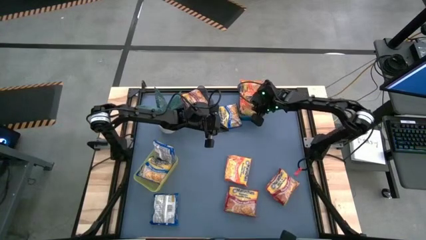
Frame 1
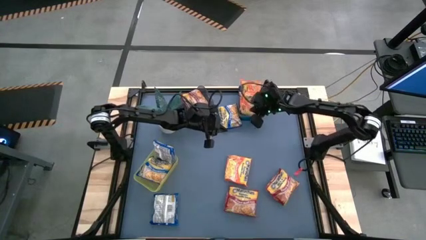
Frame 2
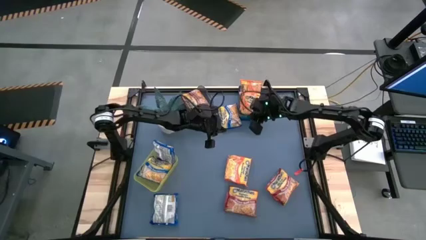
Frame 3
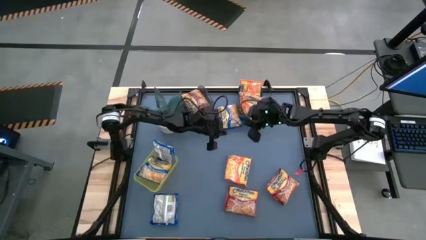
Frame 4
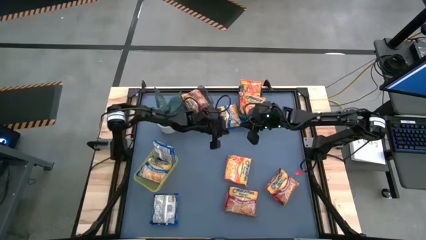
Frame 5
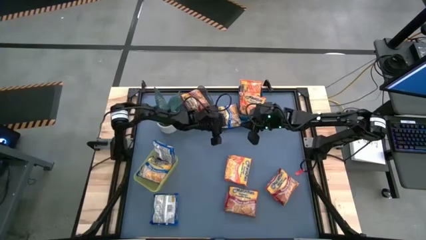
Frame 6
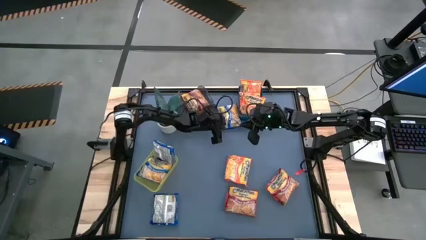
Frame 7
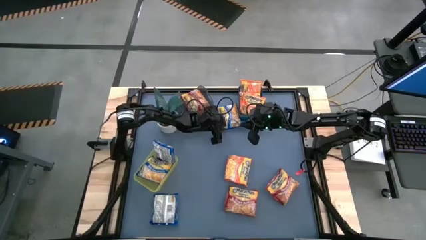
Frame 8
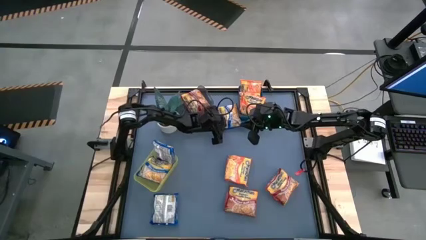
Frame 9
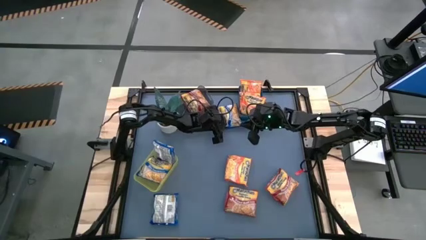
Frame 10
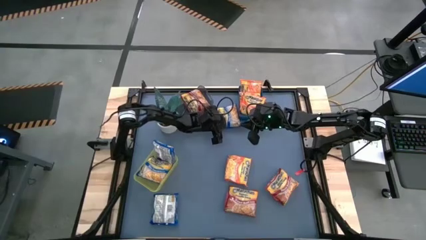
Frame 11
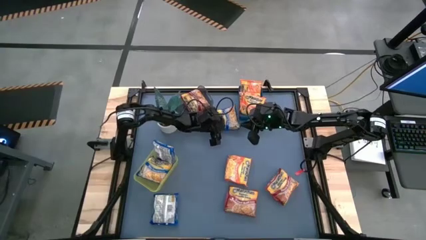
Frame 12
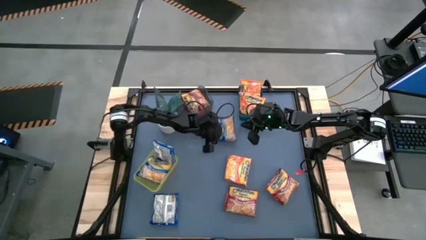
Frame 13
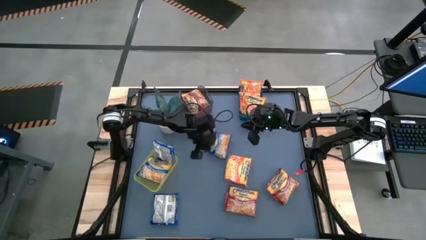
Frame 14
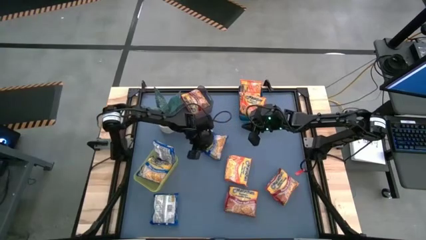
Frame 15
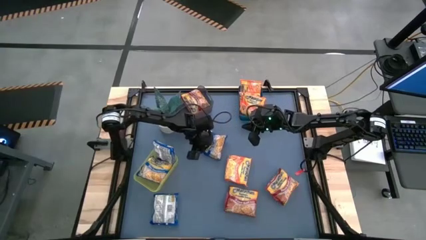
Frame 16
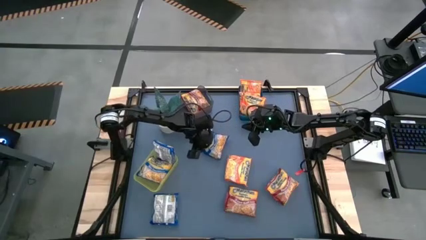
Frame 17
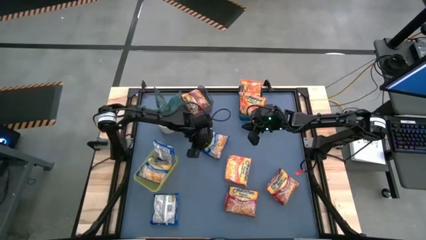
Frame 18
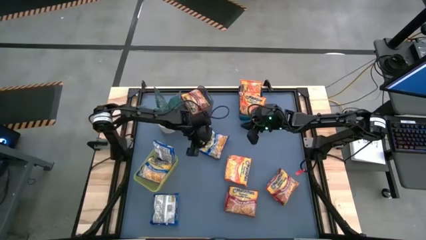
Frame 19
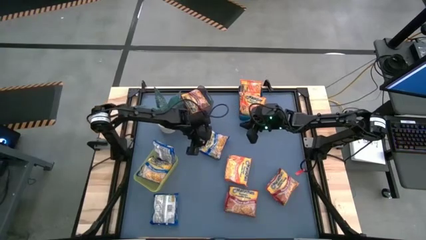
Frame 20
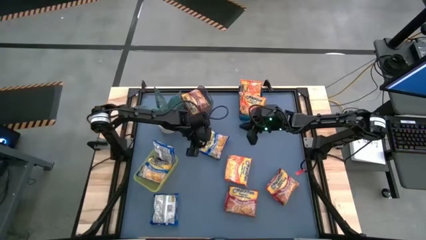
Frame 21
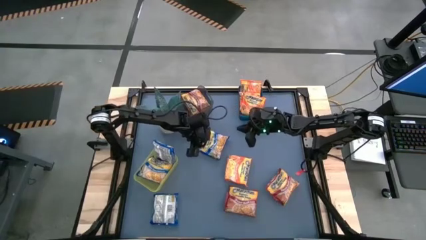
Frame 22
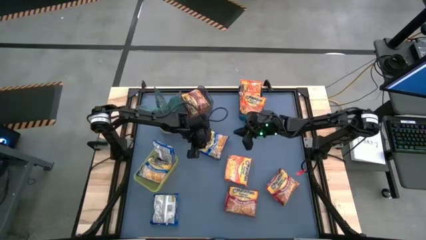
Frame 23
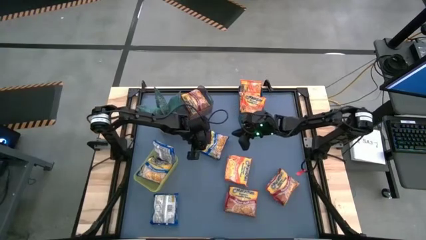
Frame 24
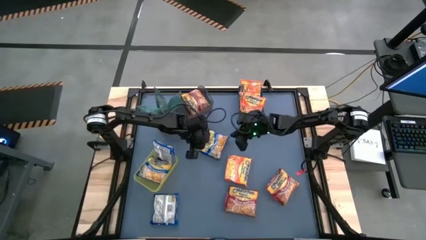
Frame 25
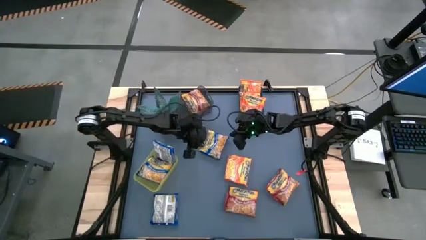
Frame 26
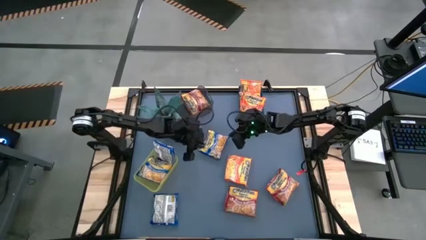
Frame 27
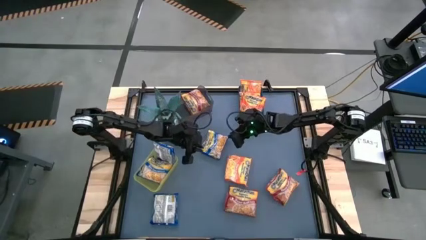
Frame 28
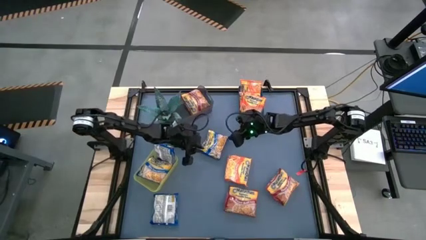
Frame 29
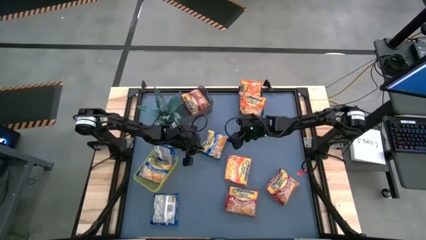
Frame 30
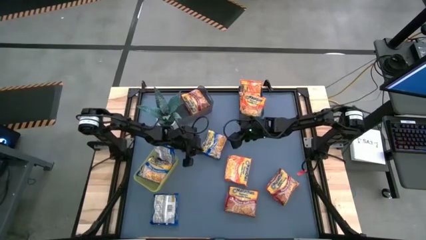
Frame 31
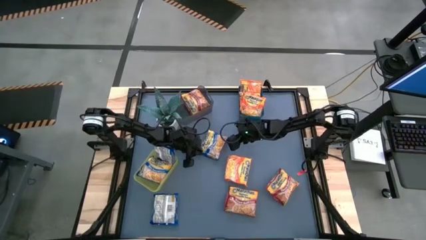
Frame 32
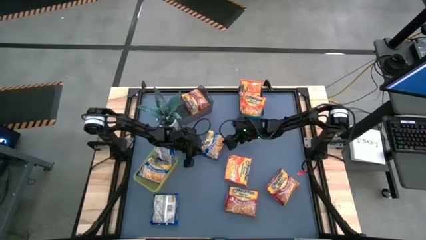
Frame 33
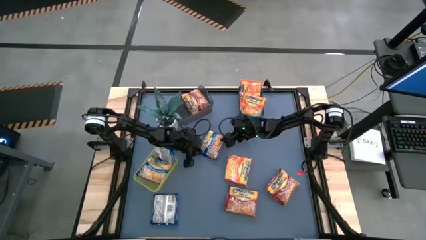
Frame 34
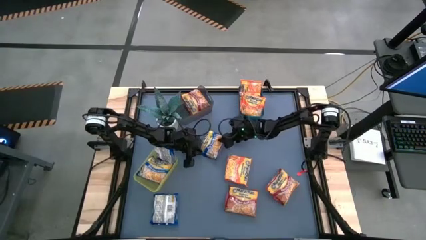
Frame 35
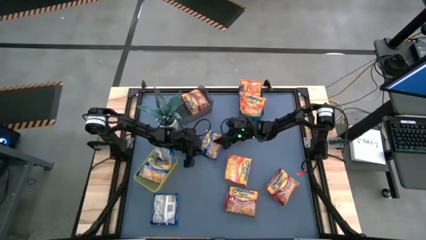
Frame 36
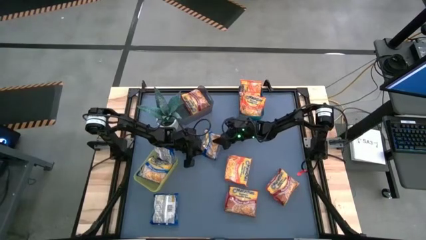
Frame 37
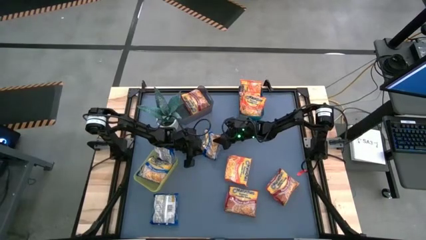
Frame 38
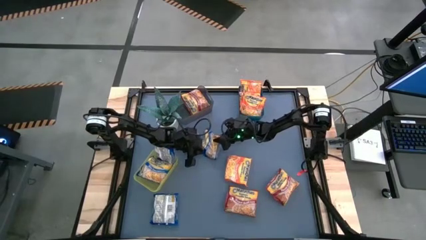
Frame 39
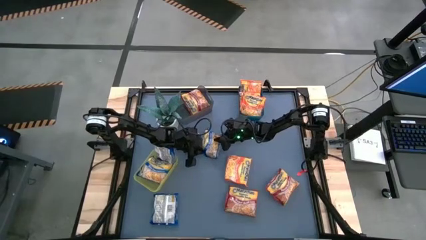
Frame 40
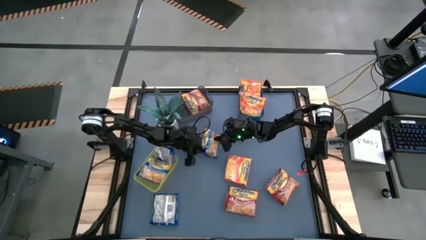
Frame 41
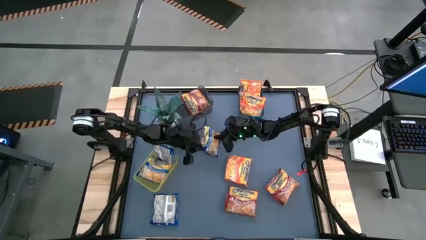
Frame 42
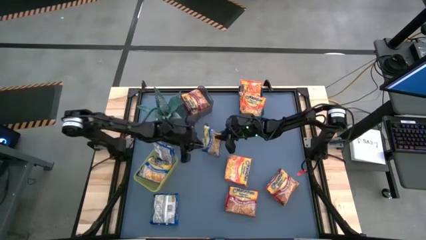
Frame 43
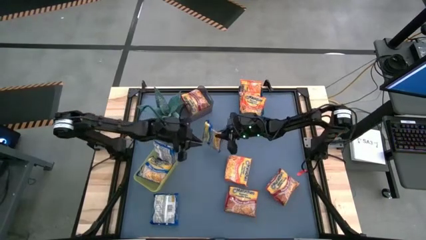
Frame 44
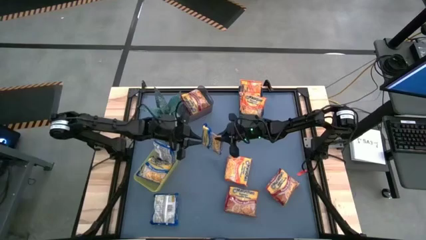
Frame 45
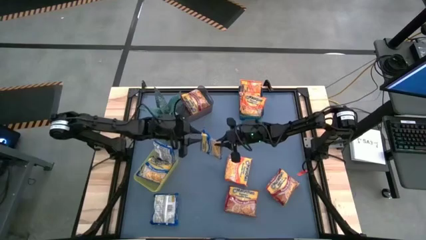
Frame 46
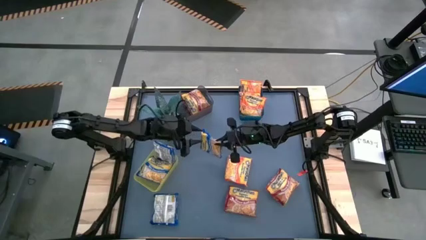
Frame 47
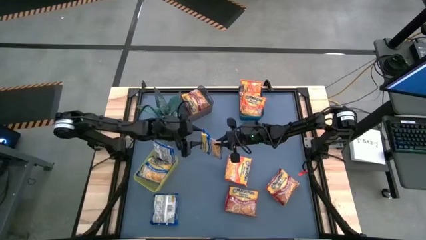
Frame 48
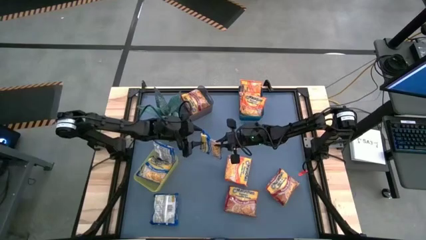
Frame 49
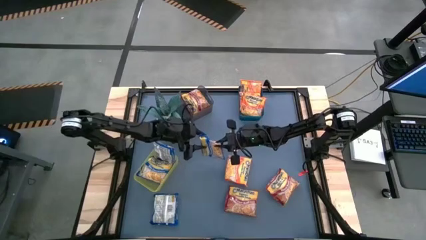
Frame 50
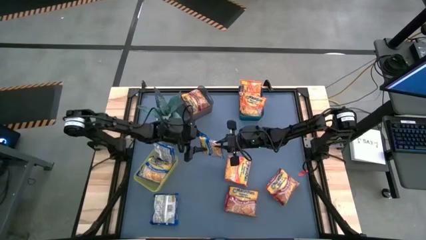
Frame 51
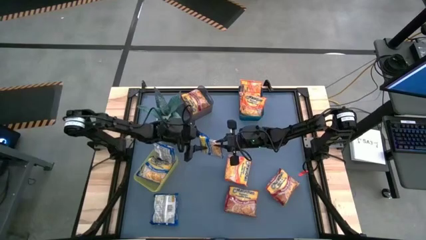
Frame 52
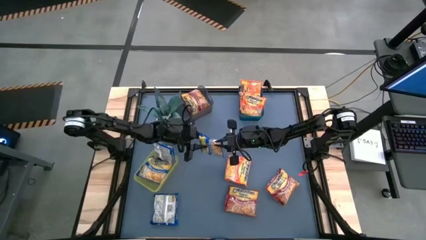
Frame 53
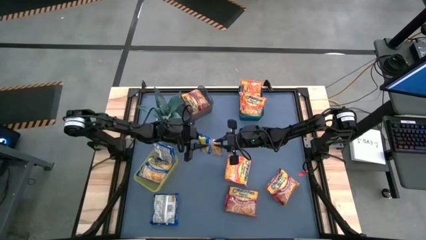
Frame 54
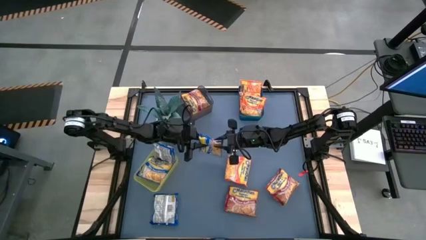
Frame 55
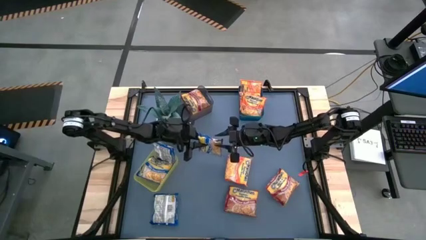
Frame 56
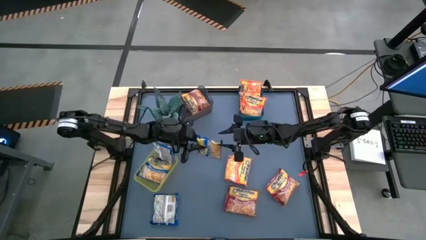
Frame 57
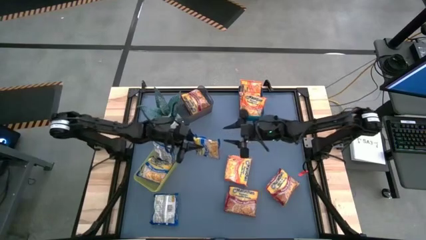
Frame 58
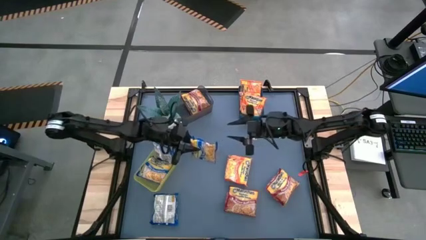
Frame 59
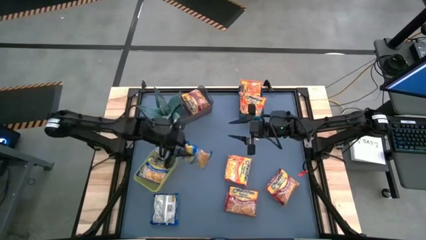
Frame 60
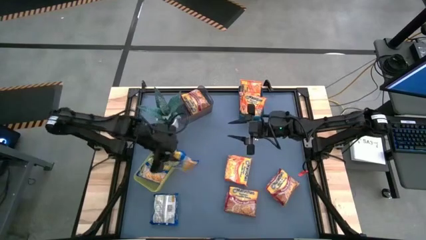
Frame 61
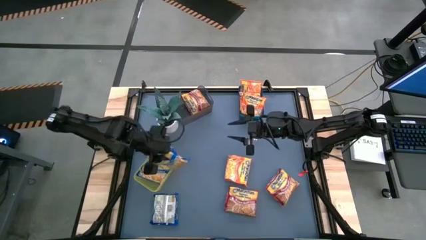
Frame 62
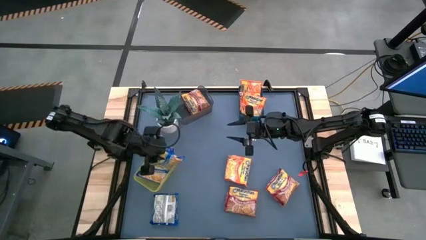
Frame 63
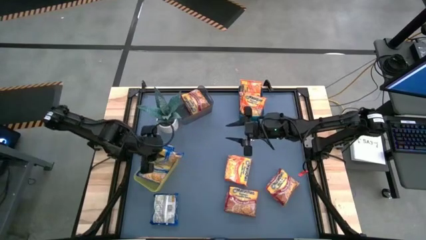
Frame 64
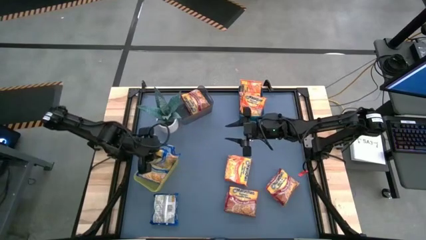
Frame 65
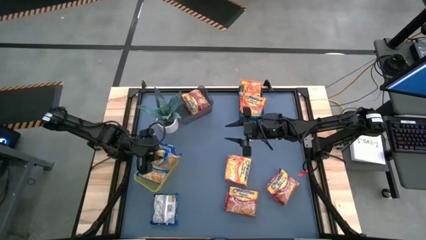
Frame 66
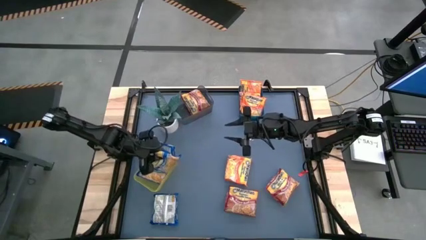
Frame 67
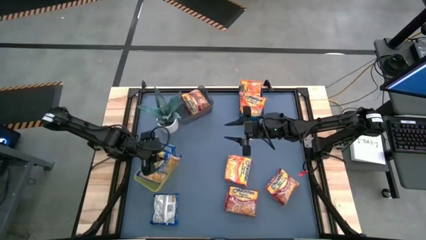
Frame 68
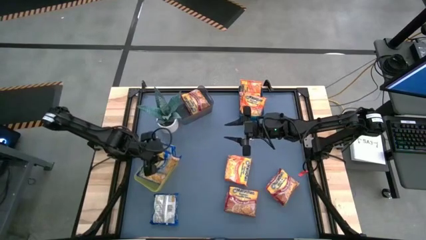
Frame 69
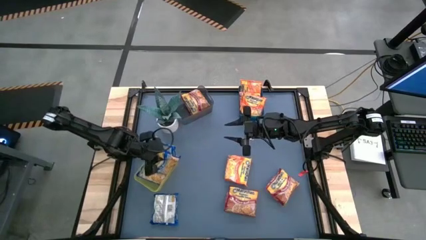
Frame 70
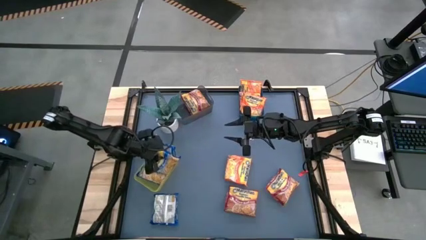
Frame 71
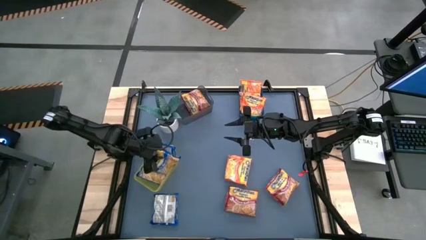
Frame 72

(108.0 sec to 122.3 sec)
Task: Sort Maruchan noodles
Put the blue noodle pack into the yellow bin
